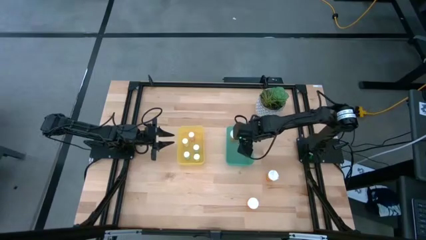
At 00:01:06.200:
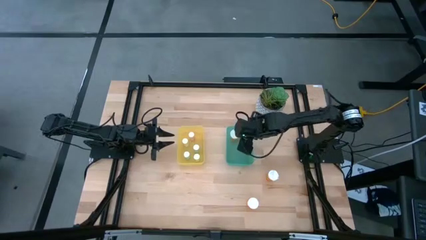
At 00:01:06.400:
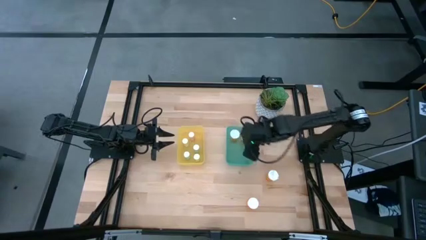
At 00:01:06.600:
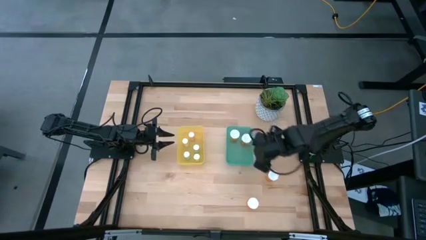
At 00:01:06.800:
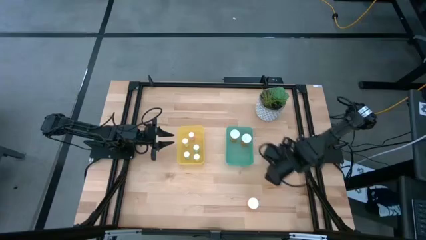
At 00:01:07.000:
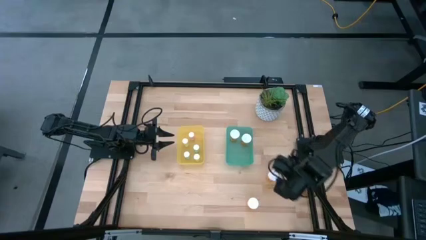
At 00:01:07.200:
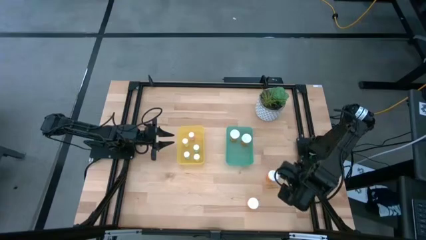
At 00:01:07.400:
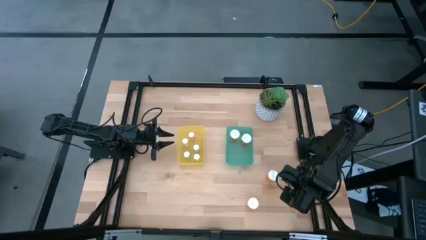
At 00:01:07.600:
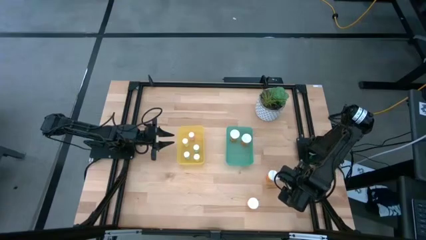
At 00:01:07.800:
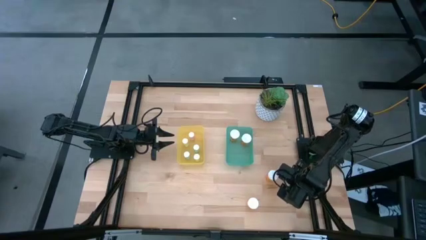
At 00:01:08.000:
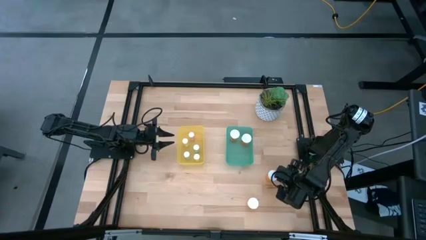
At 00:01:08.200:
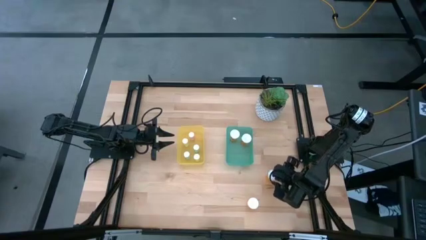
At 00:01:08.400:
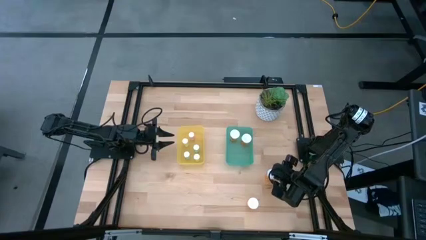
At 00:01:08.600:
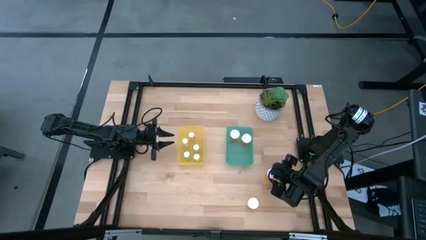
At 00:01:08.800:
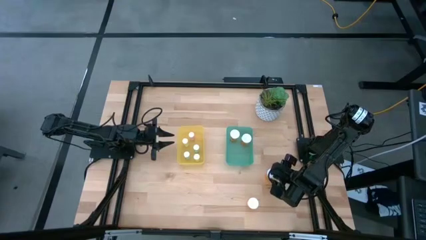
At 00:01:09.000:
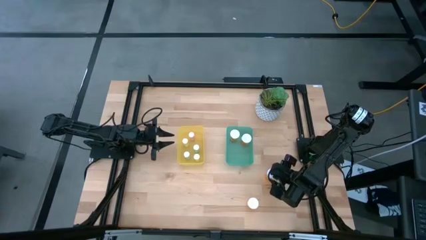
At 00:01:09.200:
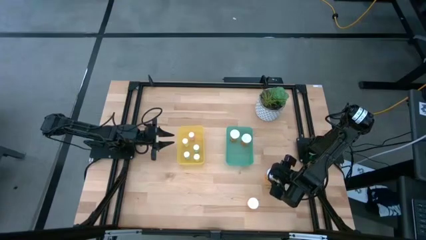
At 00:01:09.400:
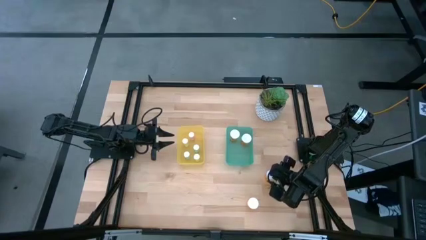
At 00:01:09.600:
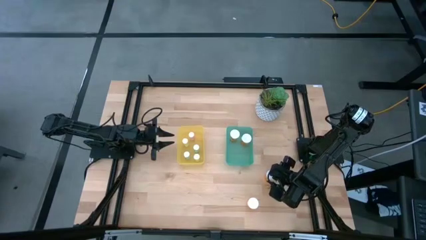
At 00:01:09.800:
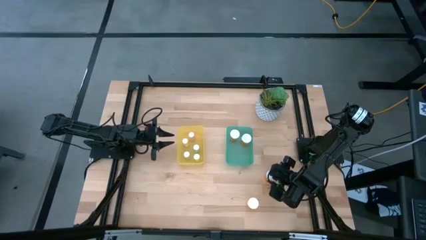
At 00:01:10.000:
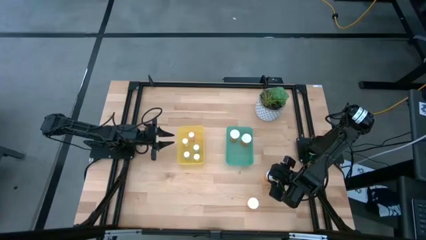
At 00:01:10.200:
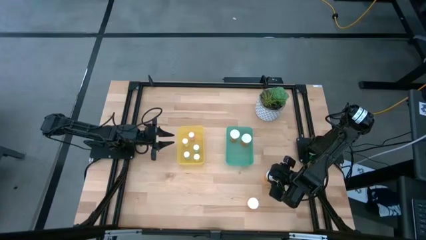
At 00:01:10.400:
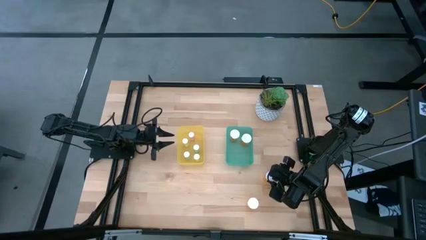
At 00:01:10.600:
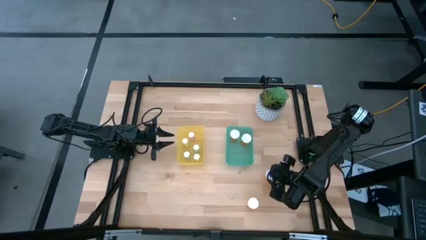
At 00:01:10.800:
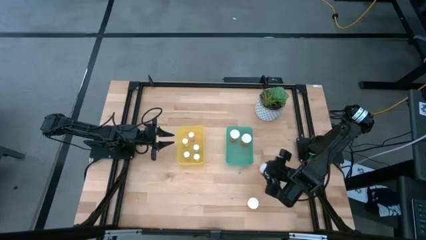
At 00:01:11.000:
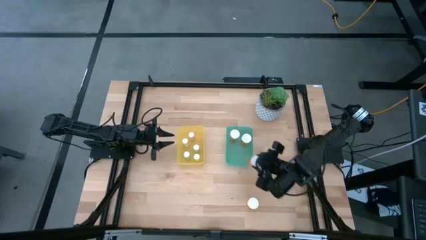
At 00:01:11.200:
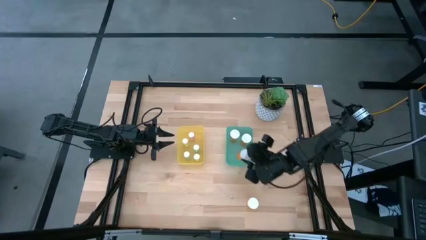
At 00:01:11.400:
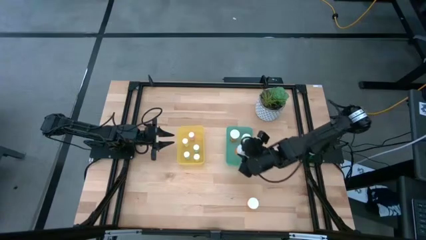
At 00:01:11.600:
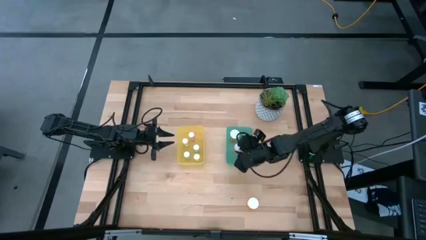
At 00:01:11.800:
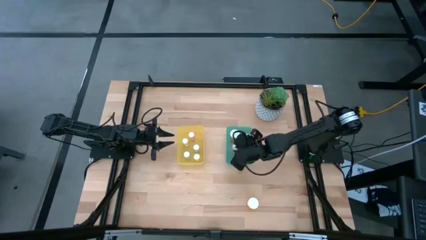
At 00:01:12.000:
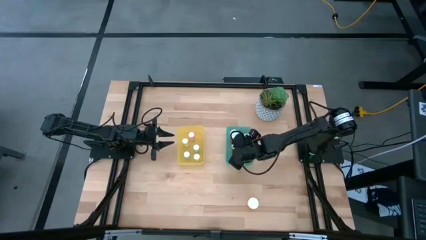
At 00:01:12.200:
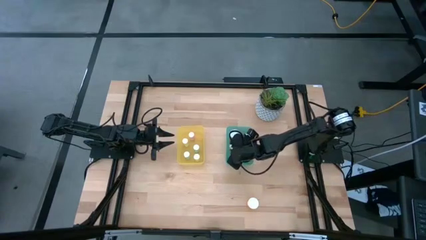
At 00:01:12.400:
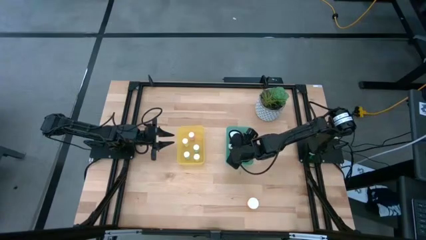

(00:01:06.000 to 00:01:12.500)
Task: Pick and place medicine bottles into bin by pill shape (circle, oval)
Put the large orange pill bottle into the green bin

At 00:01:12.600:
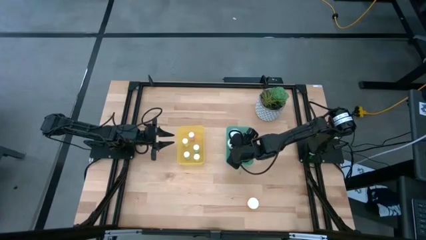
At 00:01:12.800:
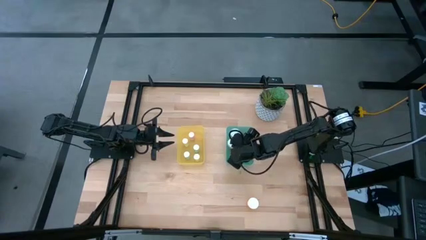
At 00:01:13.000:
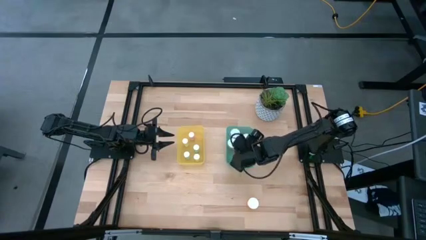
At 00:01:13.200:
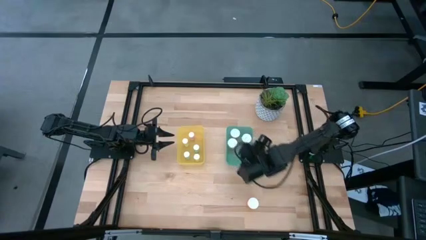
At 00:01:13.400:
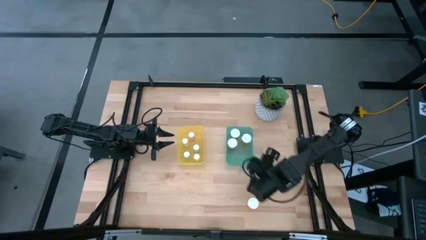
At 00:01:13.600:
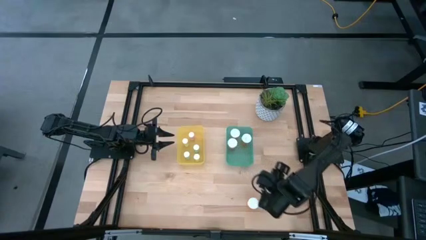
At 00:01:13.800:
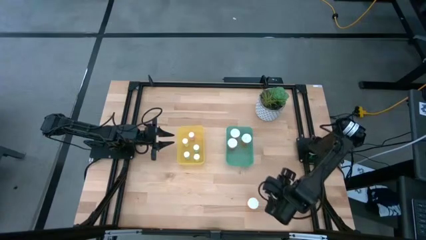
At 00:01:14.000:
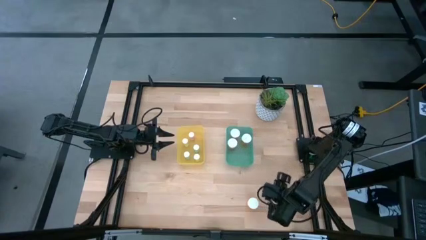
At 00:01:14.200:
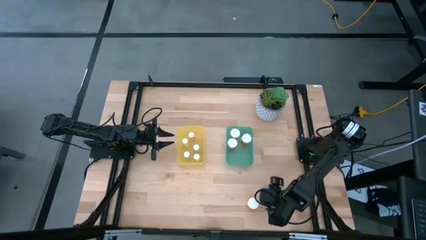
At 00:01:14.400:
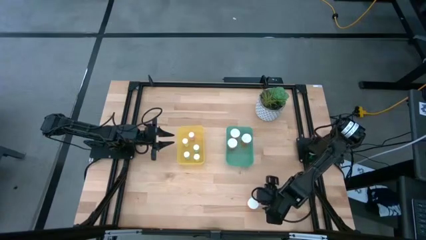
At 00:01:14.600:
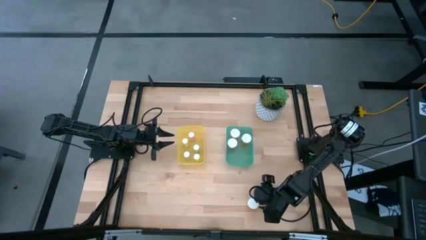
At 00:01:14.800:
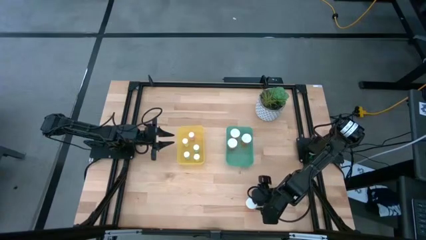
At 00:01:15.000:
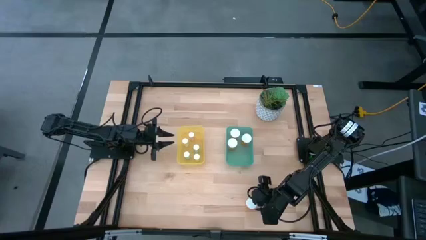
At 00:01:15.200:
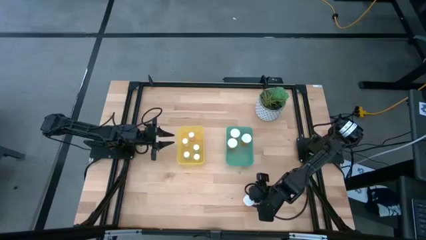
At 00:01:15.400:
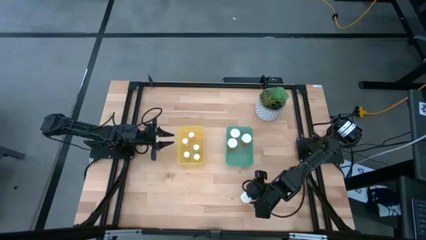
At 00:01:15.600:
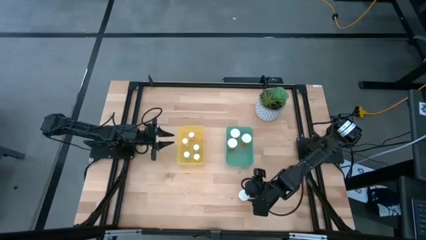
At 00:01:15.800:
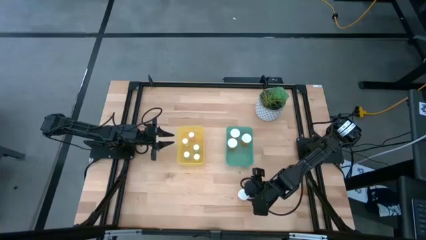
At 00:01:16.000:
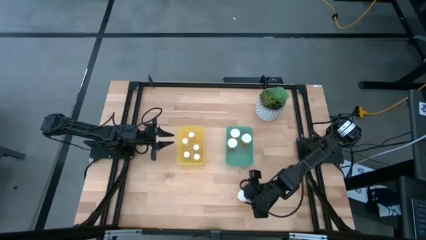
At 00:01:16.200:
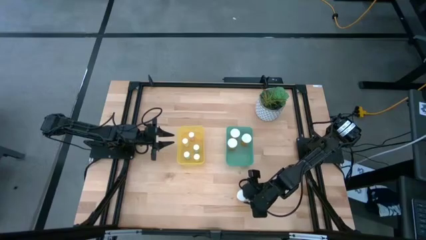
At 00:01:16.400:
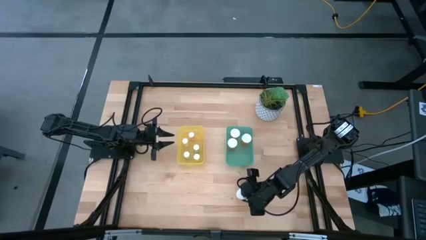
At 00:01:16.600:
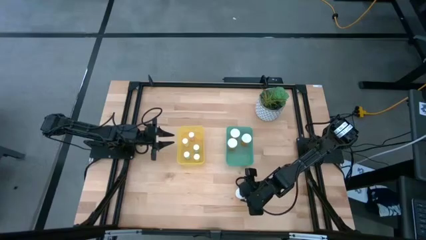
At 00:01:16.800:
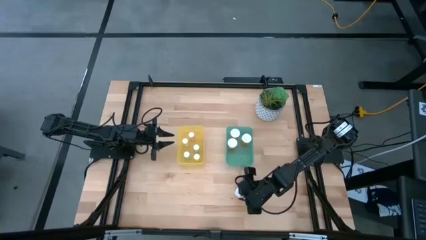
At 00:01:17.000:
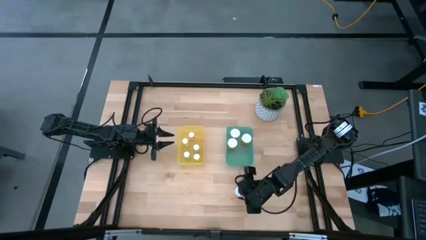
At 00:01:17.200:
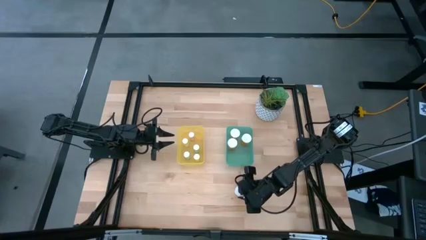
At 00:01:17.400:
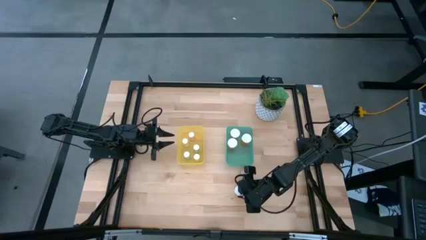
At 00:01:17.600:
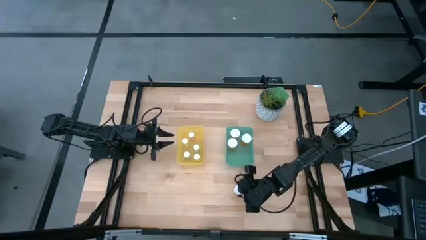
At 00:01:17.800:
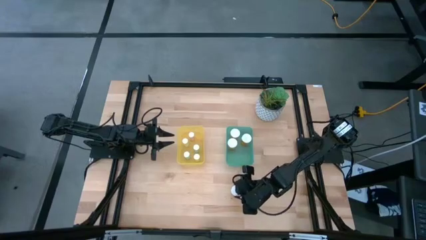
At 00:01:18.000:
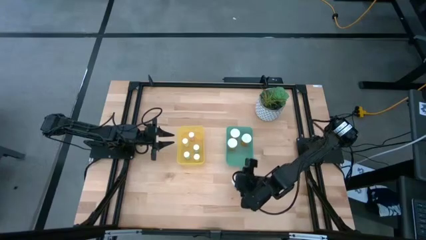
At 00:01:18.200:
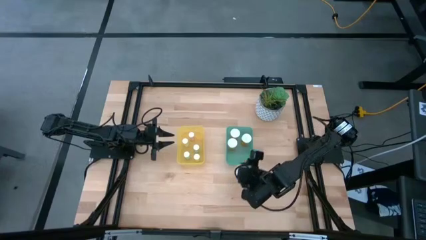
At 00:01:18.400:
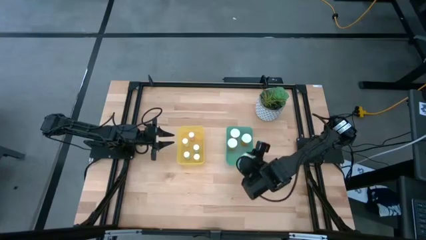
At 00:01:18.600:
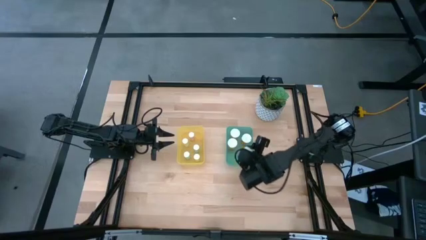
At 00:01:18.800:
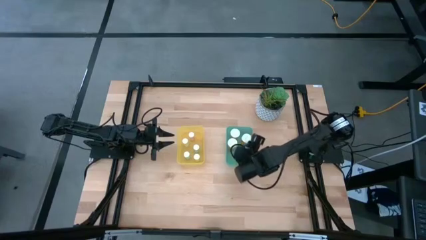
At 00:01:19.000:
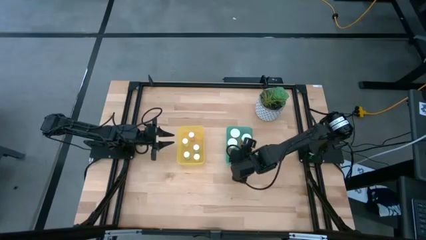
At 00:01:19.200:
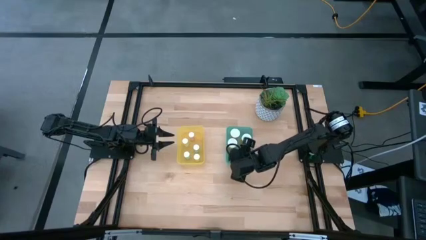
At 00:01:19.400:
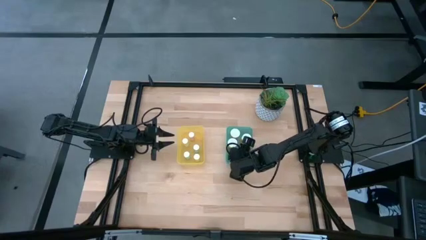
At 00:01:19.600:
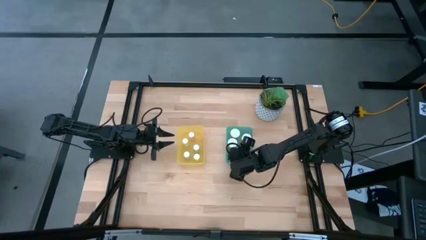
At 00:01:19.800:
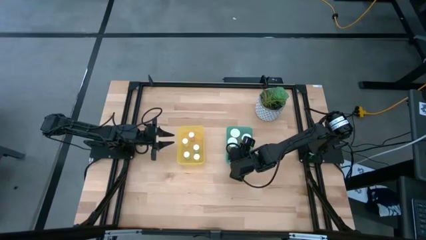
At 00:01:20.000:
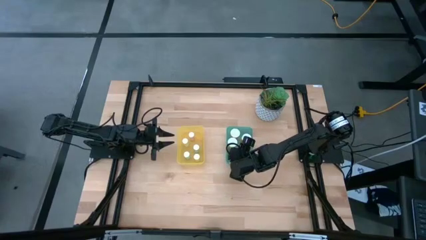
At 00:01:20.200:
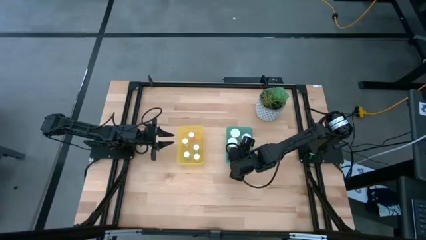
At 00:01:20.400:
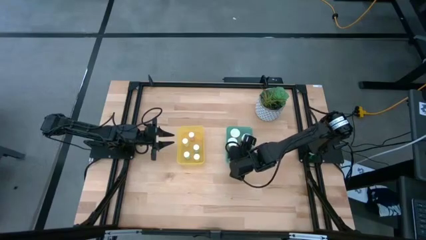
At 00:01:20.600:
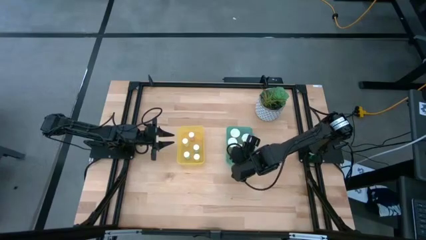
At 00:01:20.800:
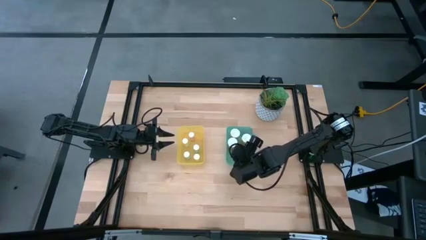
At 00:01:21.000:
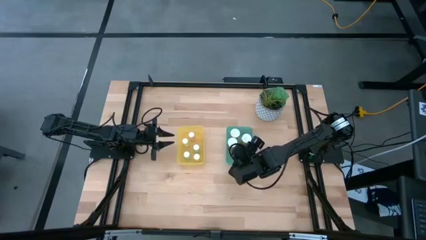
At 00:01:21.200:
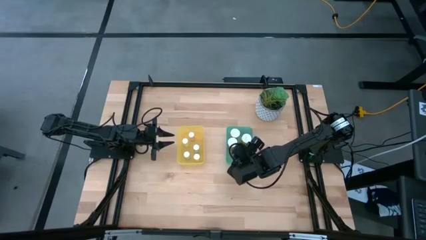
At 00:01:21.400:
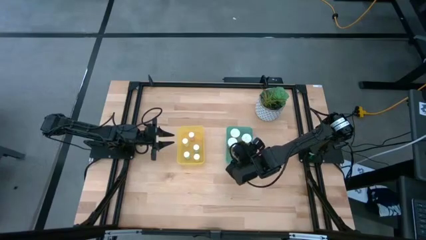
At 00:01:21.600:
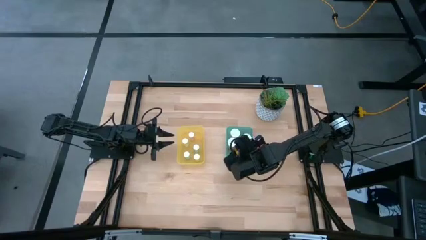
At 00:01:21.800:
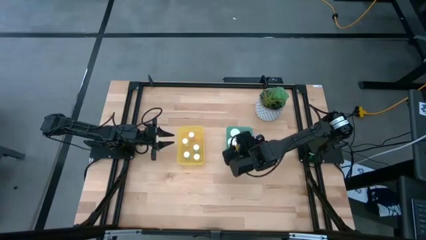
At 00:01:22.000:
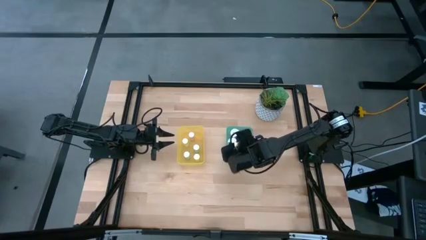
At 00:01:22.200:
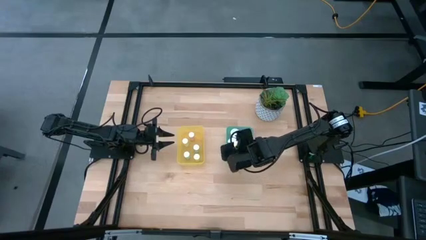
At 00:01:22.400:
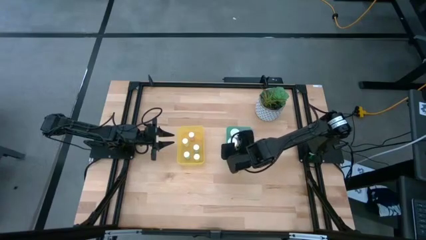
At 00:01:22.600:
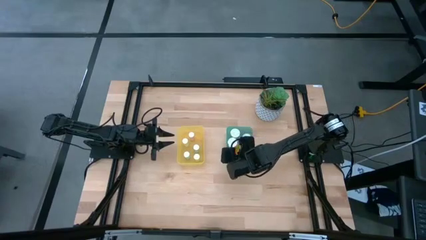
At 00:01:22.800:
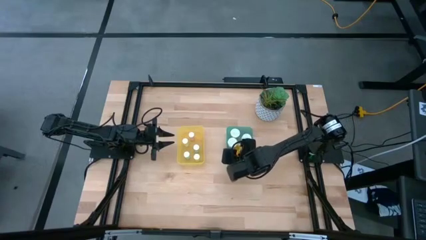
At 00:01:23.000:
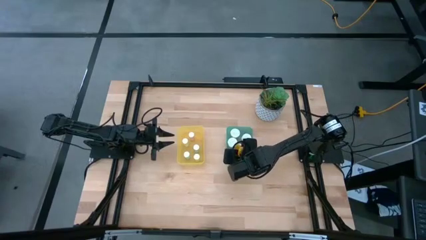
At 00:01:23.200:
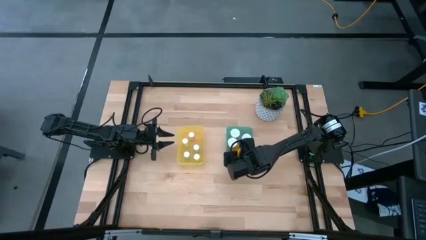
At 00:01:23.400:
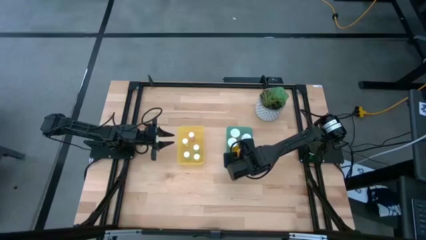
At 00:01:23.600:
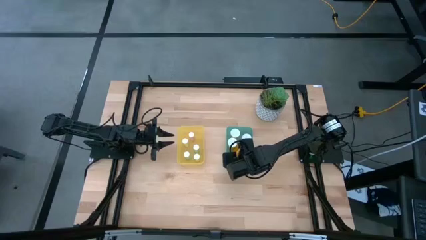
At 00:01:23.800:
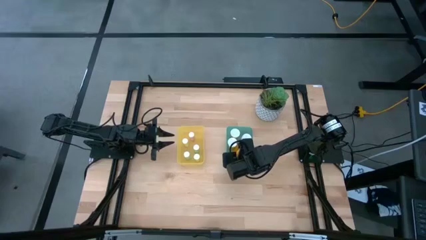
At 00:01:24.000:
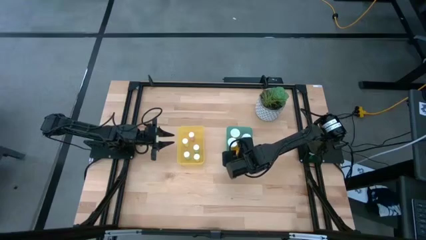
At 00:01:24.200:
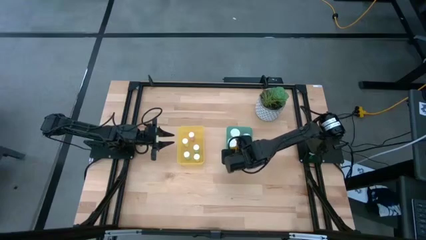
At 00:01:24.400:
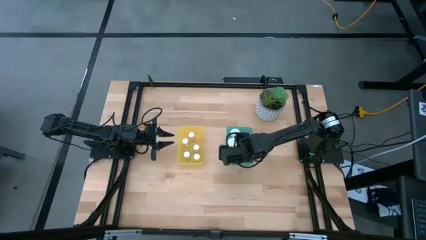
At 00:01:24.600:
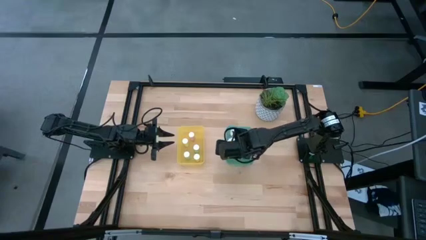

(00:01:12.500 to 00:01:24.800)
Put the large orange pill bottle into the green bin
